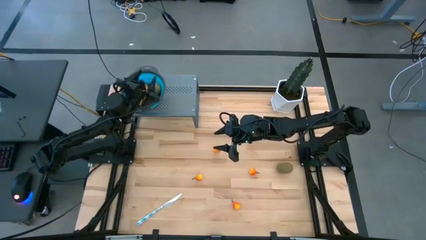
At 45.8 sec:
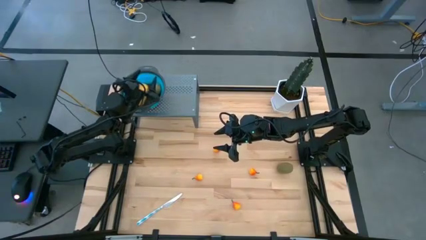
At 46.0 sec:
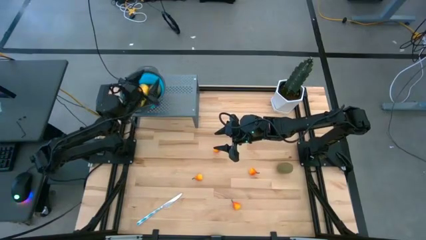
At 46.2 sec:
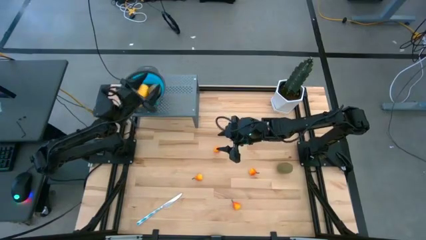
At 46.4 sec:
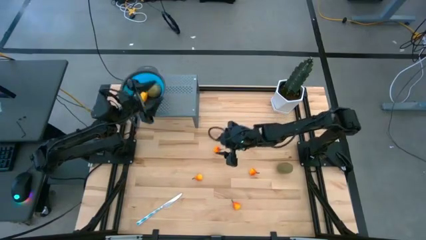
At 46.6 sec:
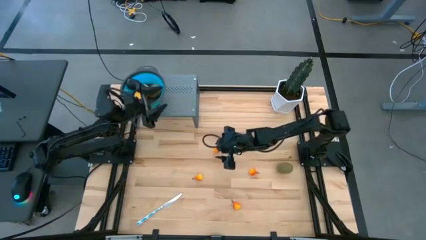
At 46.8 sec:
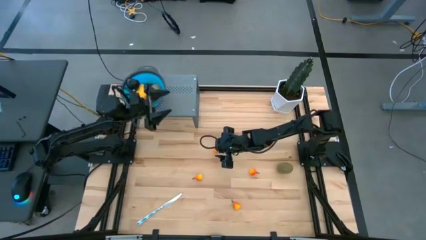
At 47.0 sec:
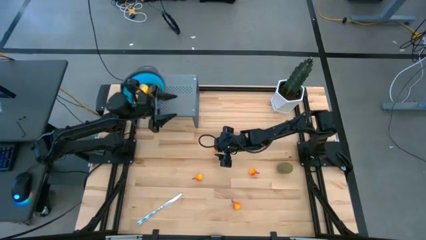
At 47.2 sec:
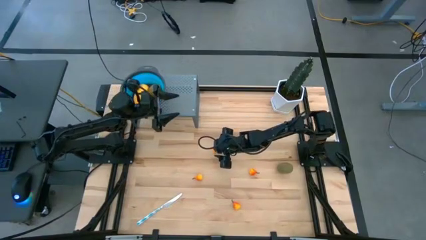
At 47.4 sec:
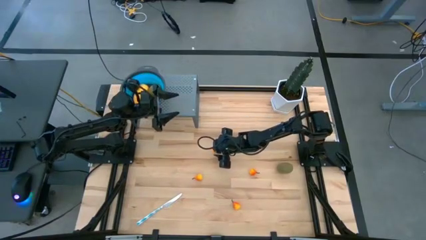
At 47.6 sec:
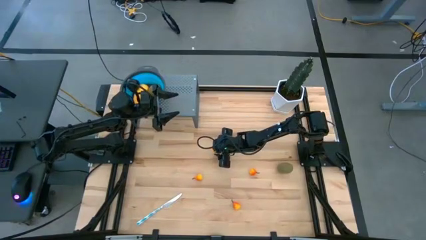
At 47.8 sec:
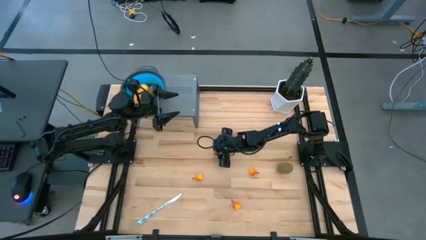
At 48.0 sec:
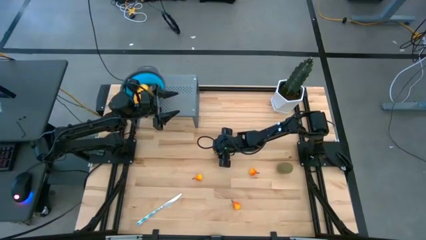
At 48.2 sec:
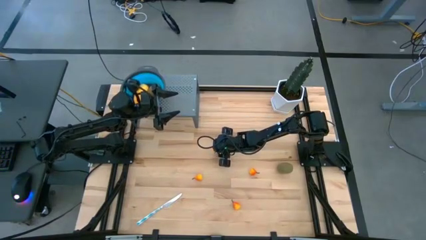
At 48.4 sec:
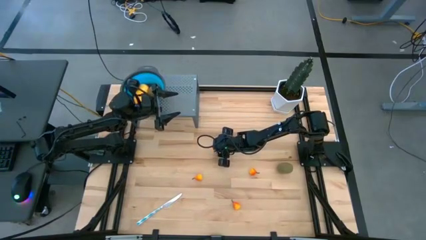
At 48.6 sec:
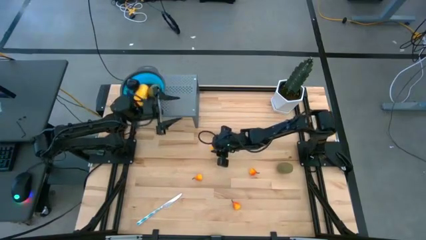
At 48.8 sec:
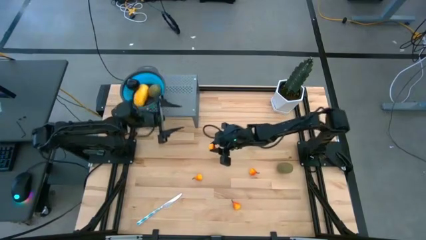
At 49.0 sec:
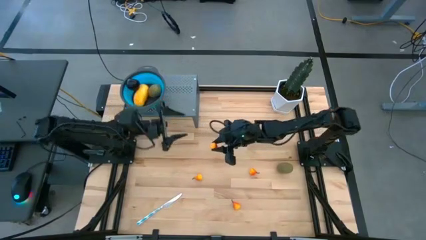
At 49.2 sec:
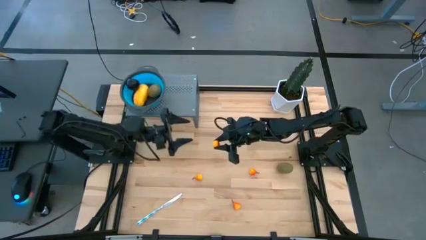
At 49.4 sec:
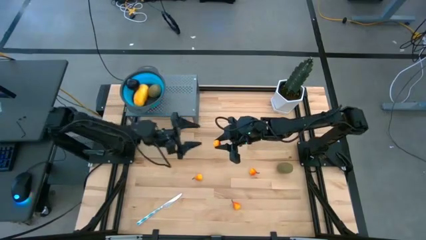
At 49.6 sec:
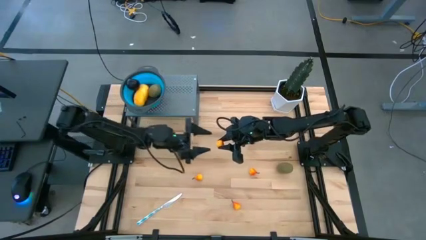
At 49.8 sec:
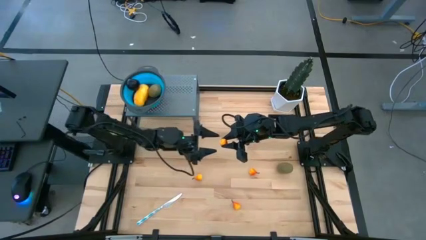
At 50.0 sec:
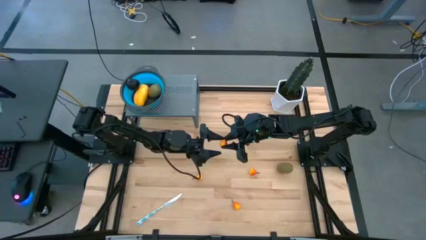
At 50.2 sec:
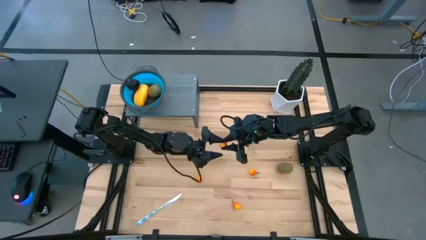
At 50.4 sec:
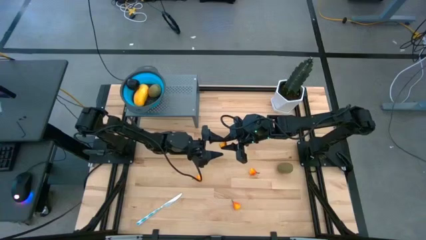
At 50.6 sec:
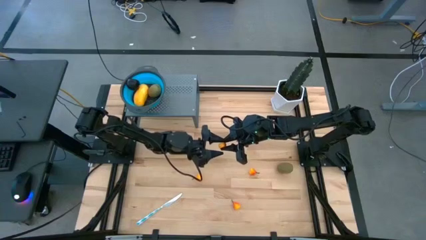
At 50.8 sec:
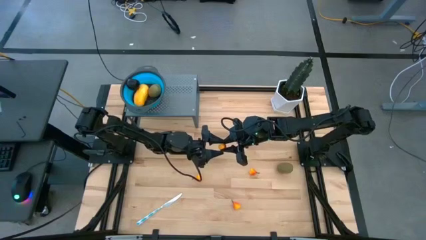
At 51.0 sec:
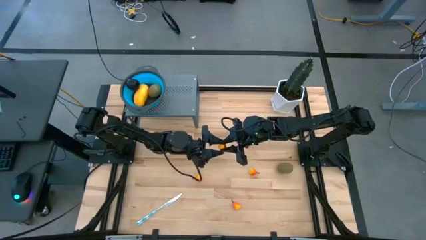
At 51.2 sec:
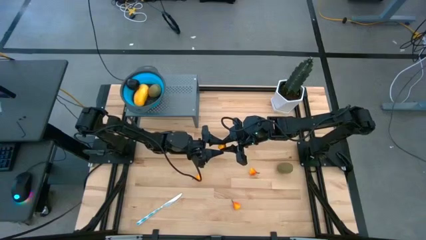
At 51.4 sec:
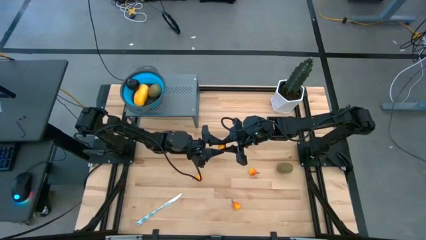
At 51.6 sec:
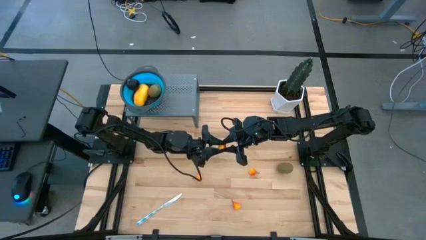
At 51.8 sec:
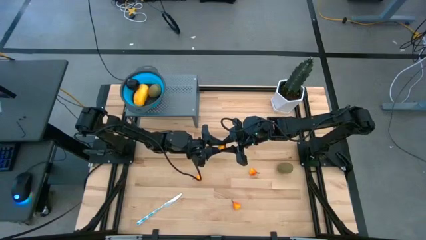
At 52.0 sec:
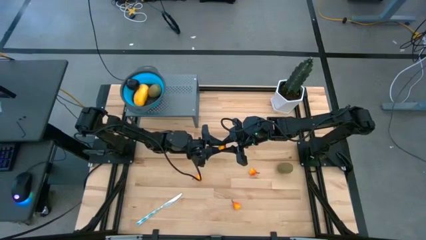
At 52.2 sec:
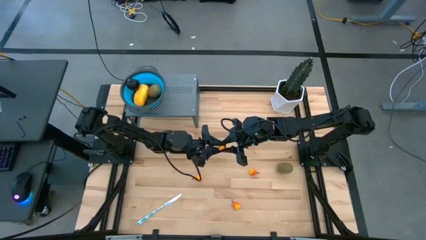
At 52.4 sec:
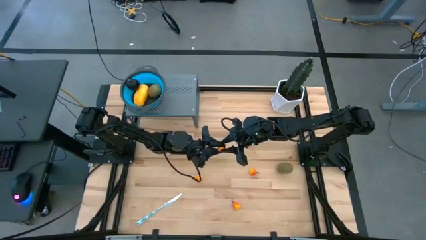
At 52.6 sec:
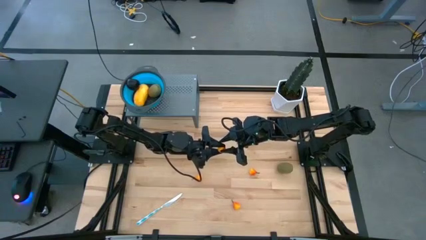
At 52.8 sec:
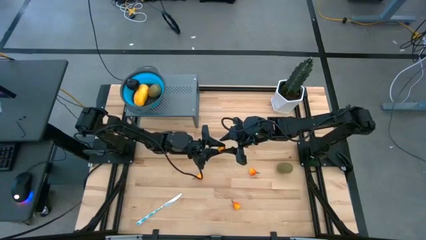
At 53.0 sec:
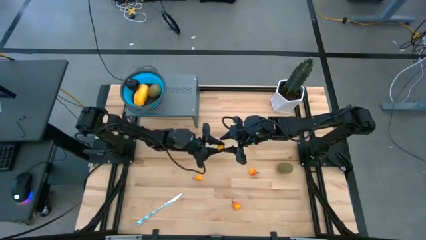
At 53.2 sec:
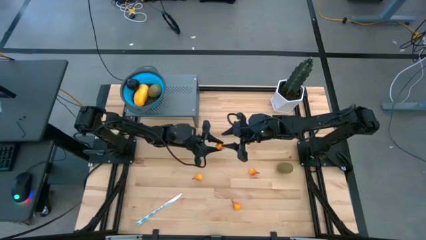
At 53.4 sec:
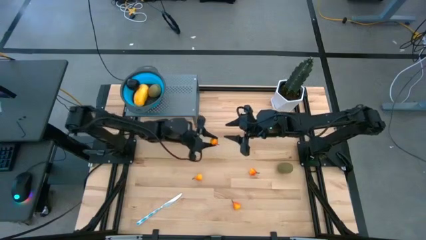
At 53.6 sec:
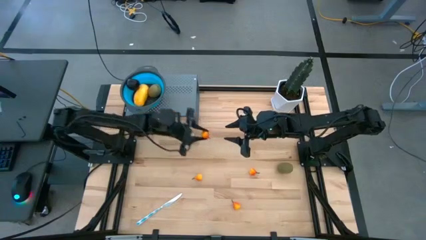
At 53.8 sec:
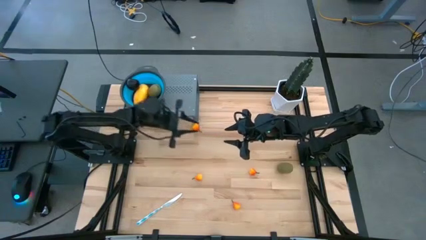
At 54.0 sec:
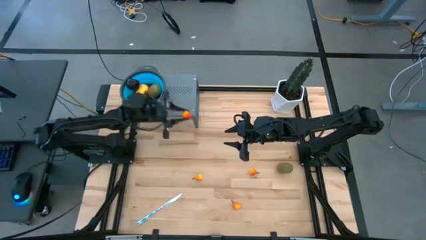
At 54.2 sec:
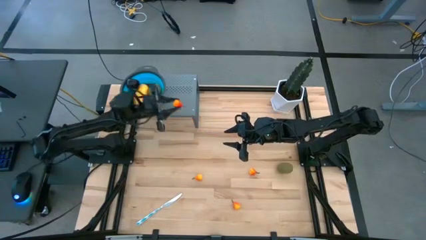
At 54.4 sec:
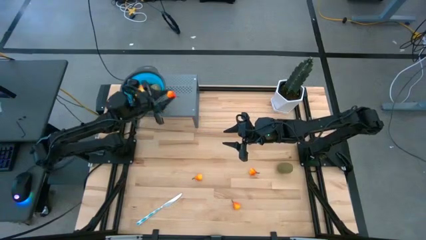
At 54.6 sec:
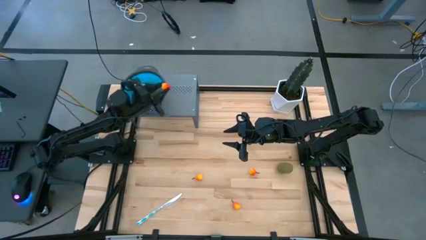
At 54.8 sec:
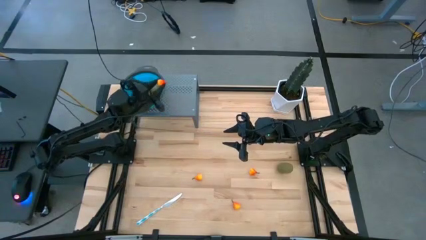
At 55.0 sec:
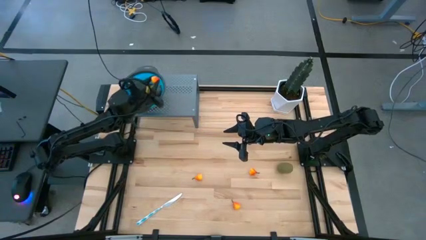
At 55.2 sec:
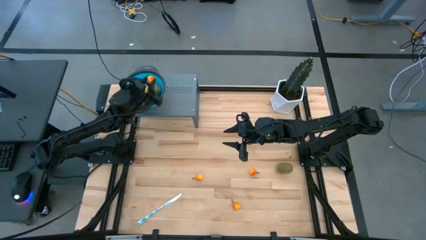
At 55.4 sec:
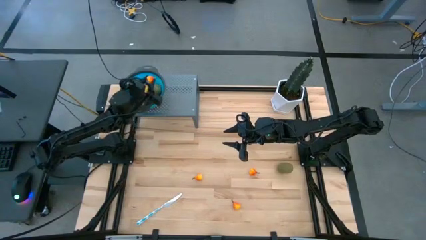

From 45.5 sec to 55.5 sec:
Task: Pick & Place Fruit
Put the orange pear into the blue strainer bowl on the shelf
